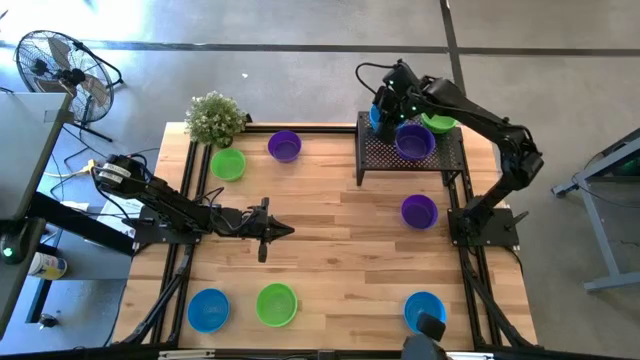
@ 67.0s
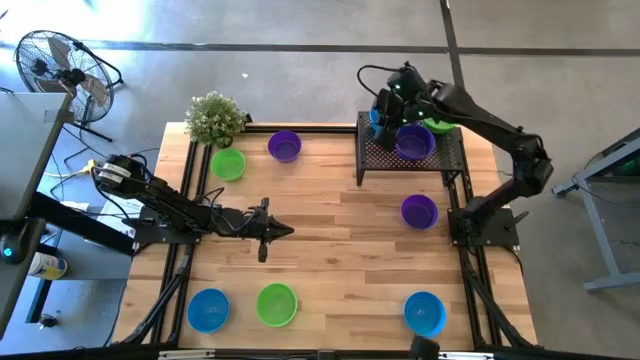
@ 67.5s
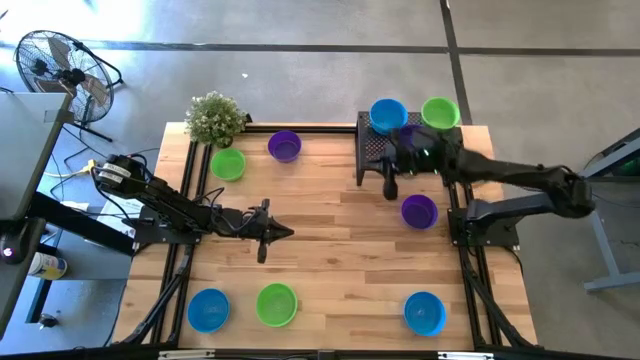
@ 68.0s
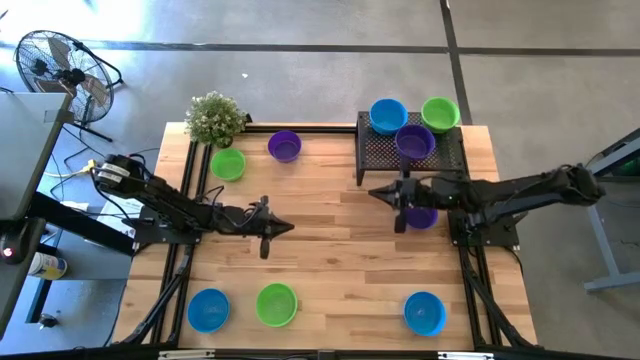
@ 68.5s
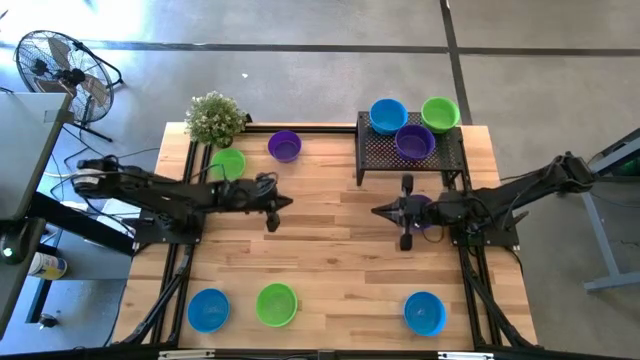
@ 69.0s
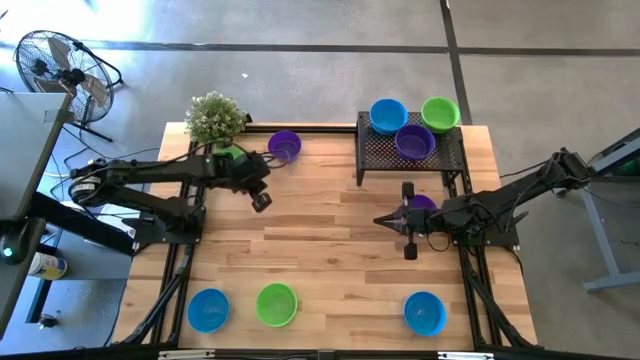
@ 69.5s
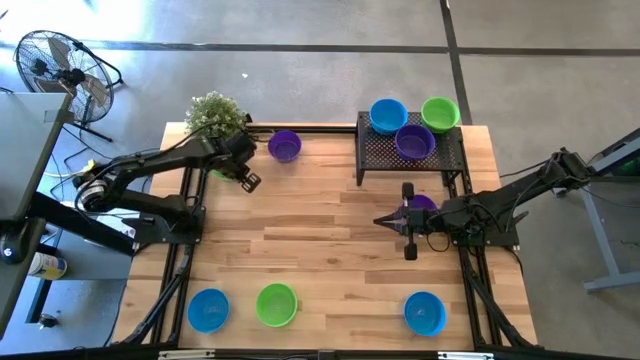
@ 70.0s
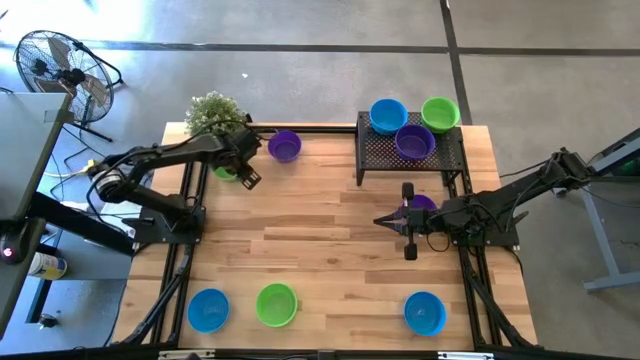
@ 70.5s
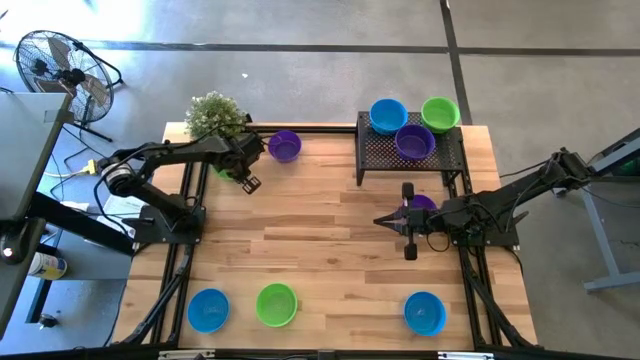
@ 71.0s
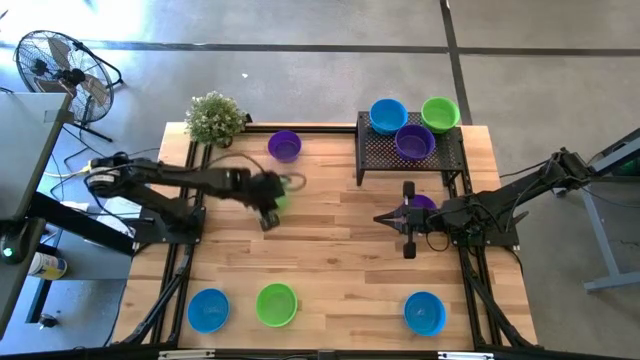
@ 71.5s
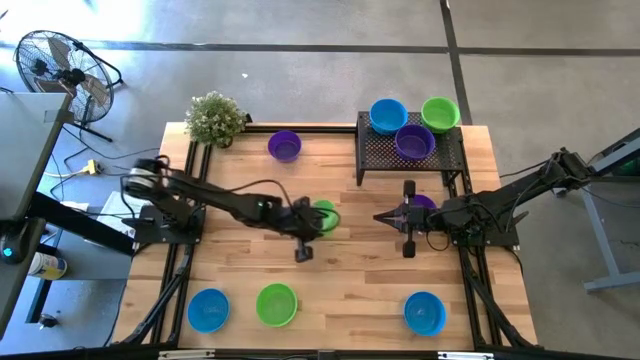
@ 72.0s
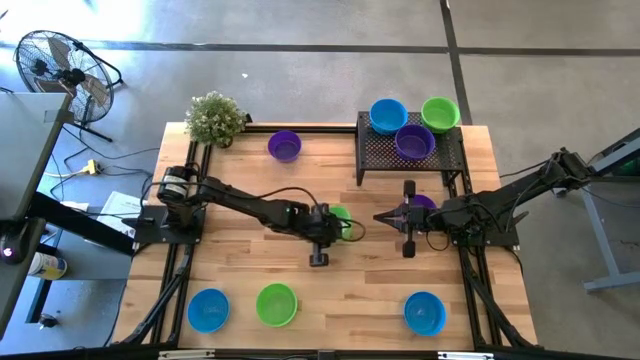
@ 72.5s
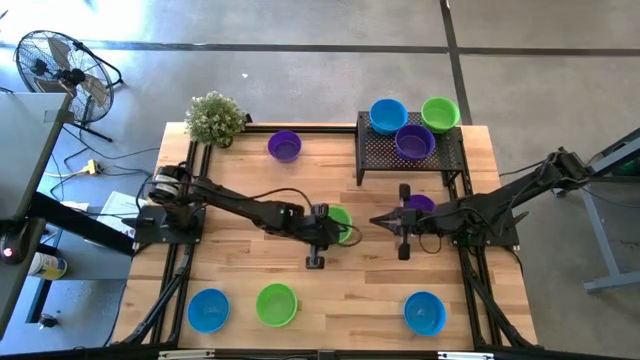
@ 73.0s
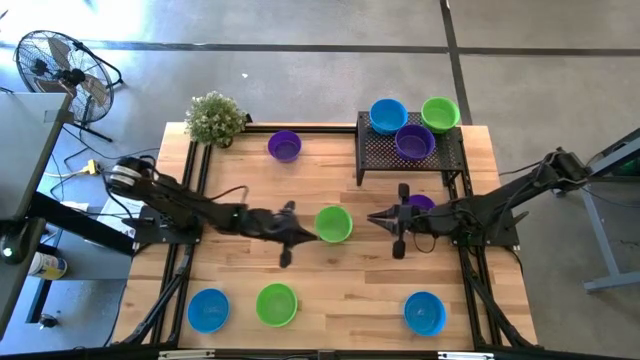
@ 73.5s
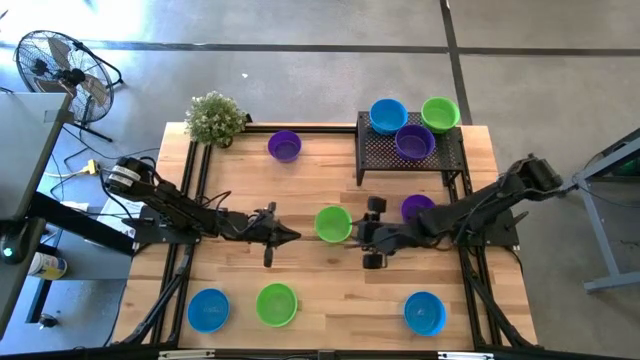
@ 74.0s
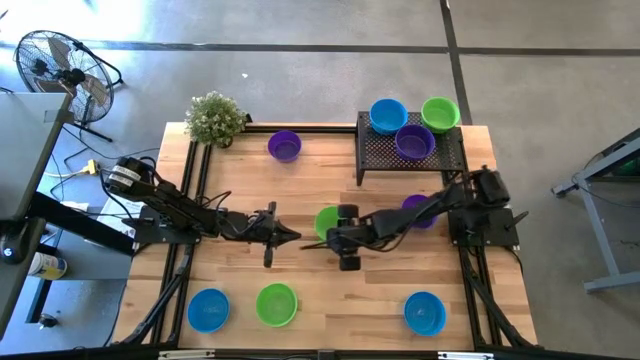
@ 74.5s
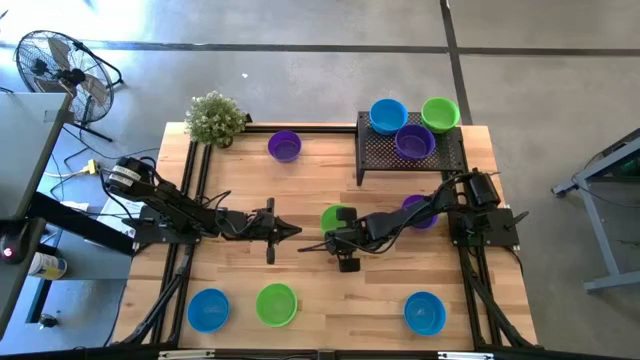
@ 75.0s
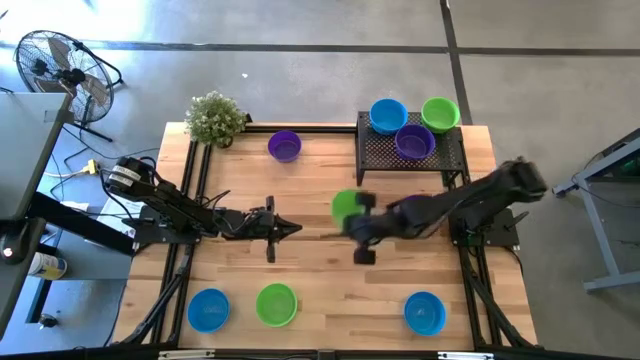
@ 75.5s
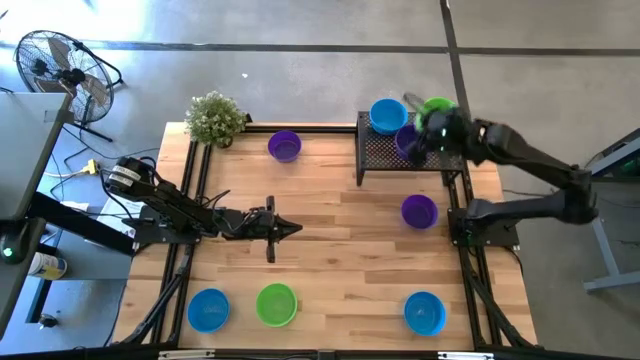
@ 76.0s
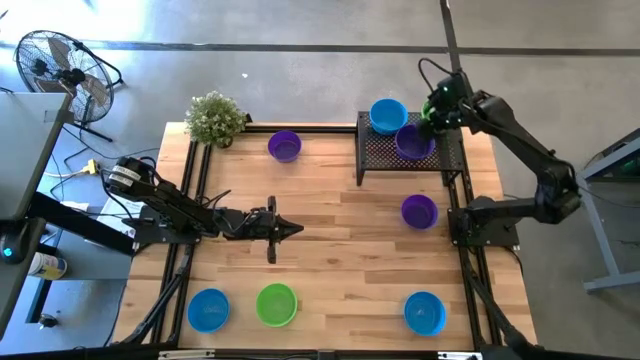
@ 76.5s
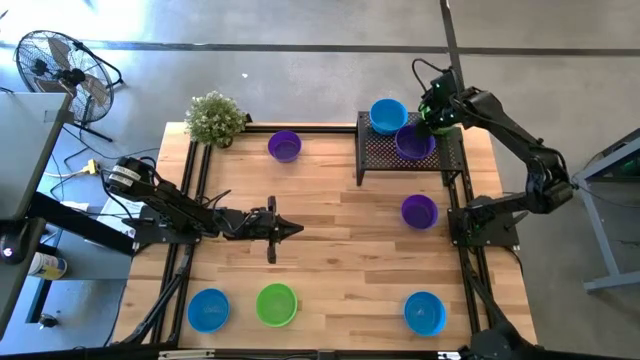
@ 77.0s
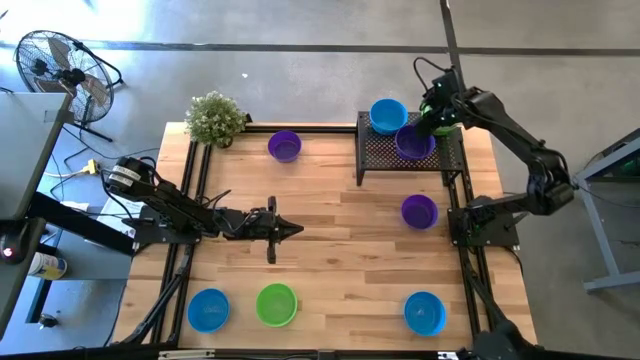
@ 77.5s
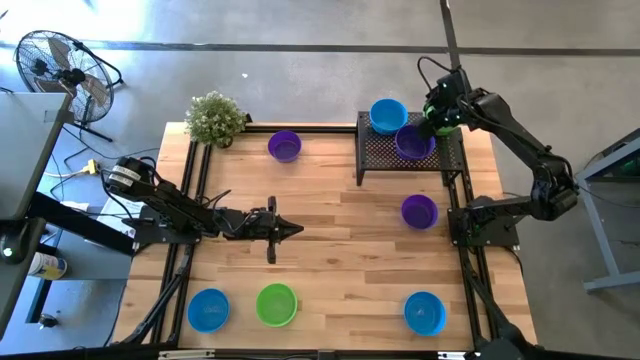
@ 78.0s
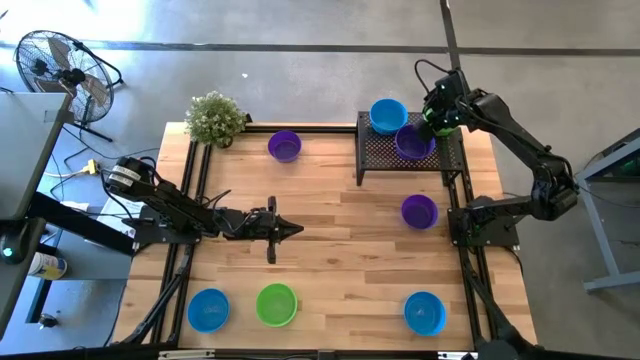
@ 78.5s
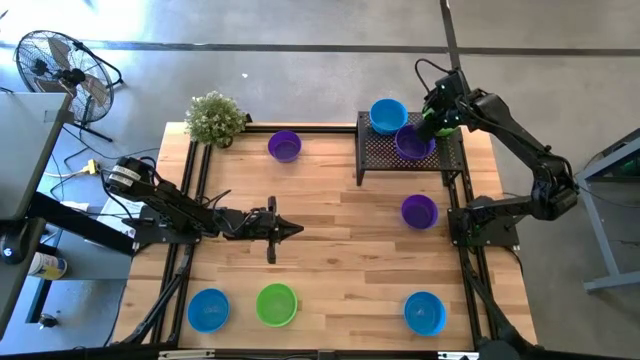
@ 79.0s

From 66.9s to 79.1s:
Task: Pick & Place Mini bowls
Stack the green bowl on top of the green bowls on the shelf

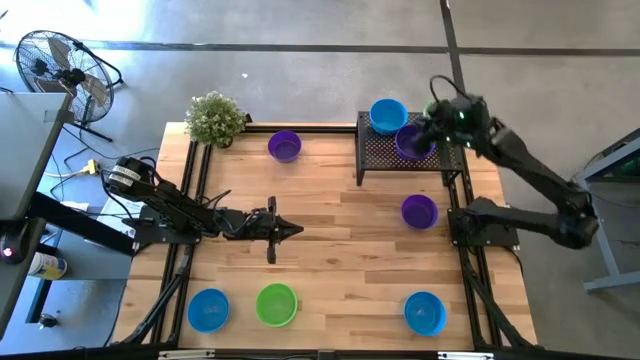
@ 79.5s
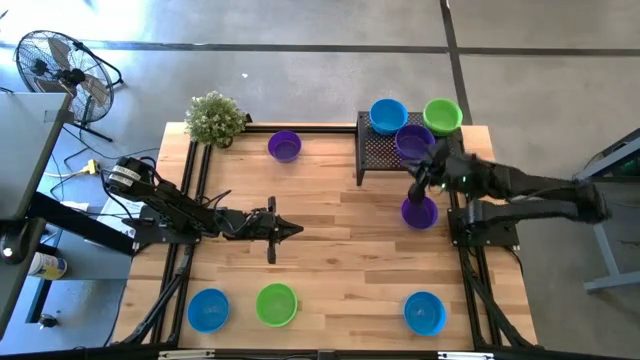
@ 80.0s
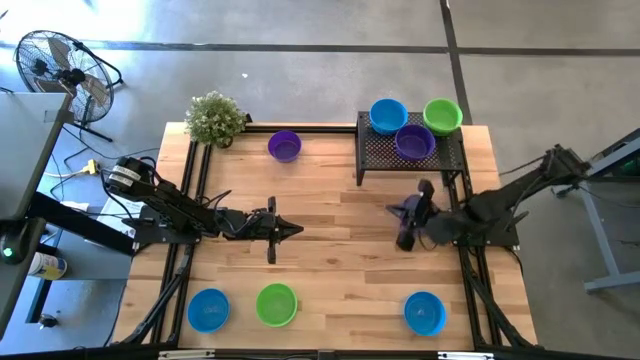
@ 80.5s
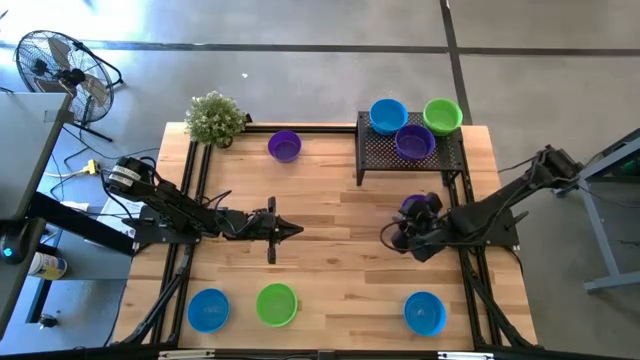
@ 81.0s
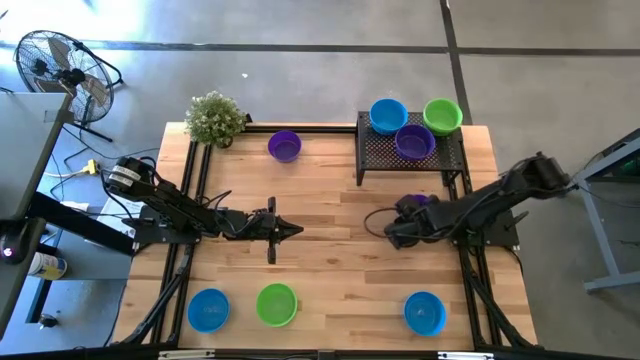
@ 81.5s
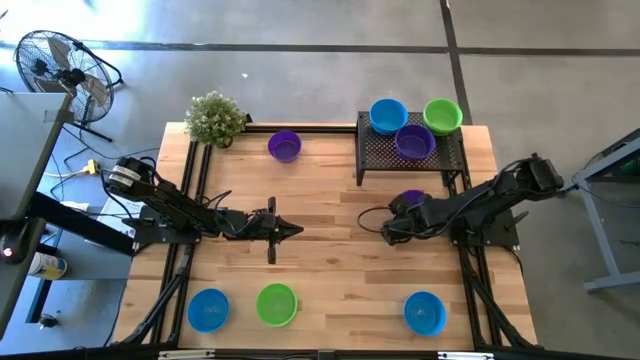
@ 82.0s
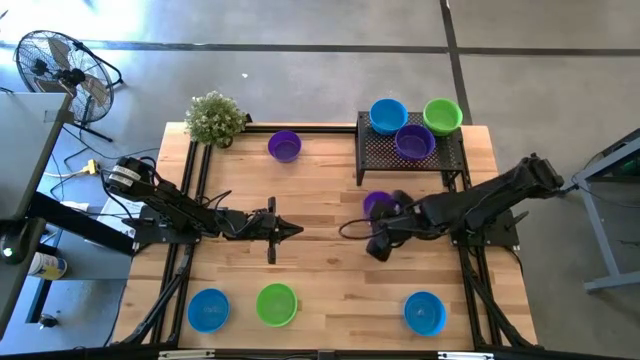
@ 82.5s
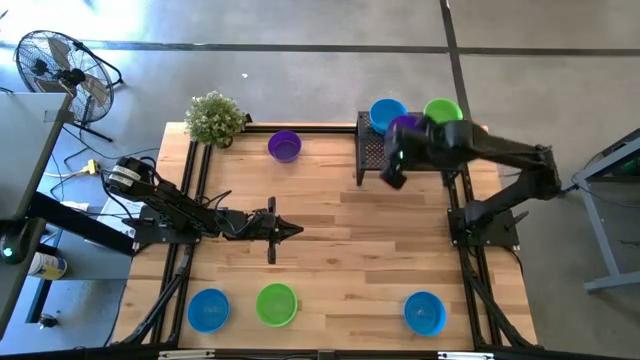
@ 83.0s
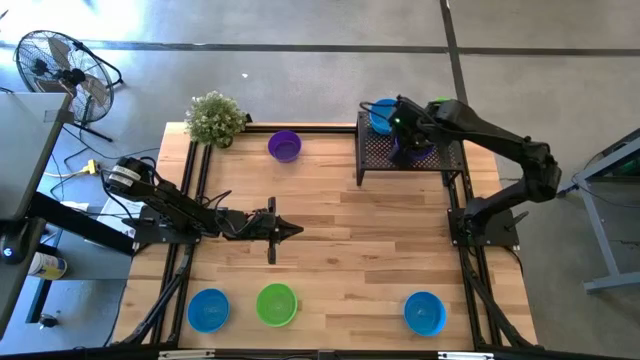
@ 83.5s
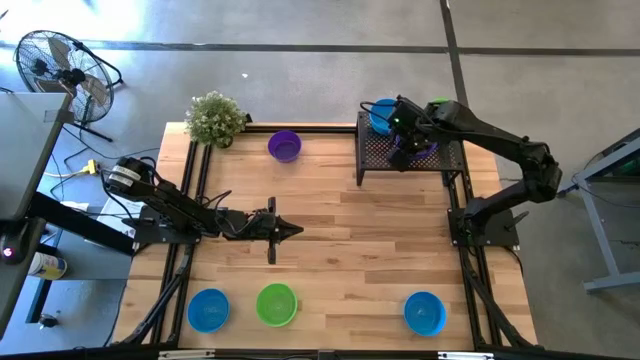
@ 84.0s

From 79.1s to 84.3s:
Stack the dark blue bowl on top of the dark blue bowls on the shelf

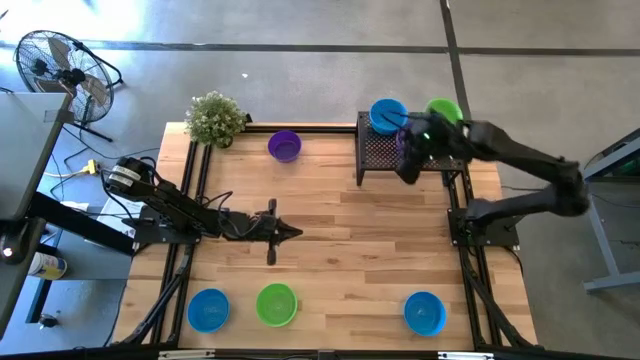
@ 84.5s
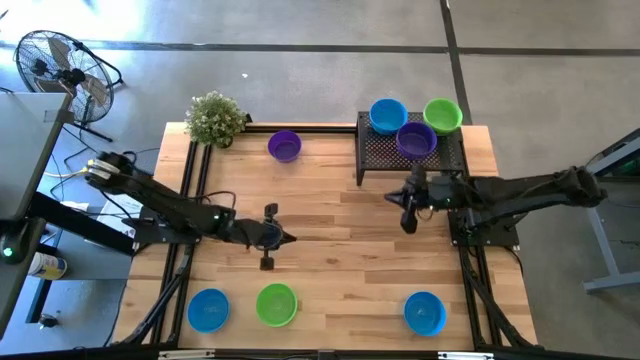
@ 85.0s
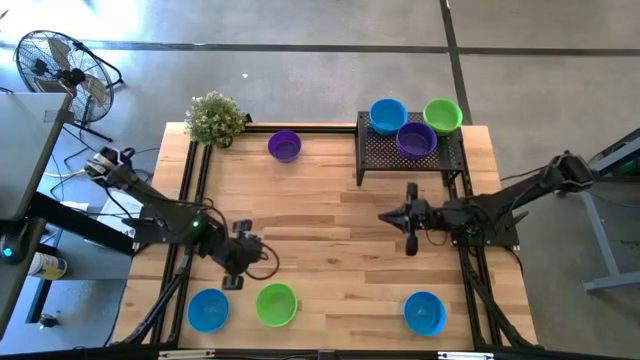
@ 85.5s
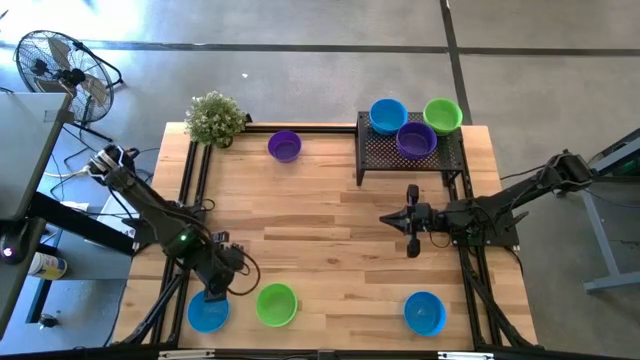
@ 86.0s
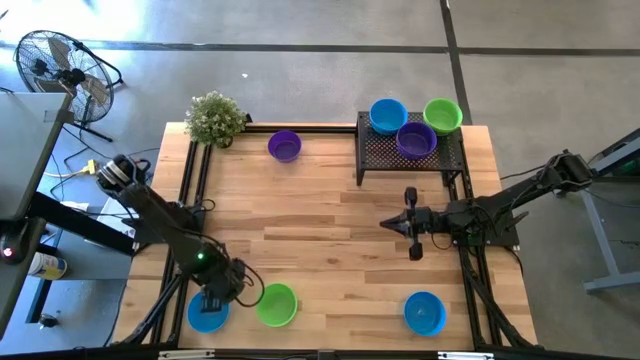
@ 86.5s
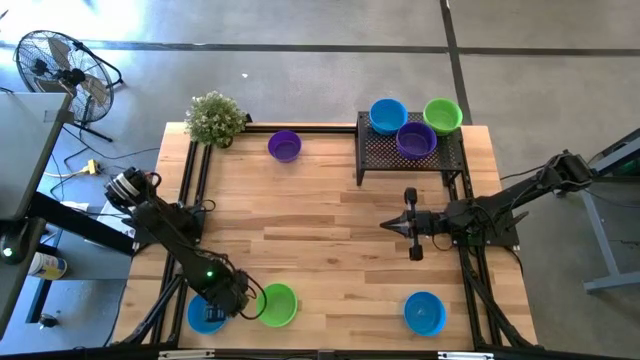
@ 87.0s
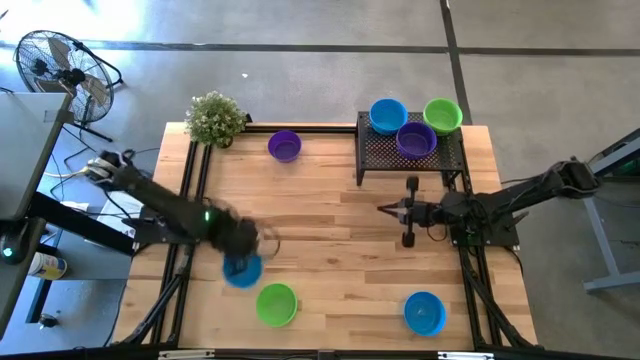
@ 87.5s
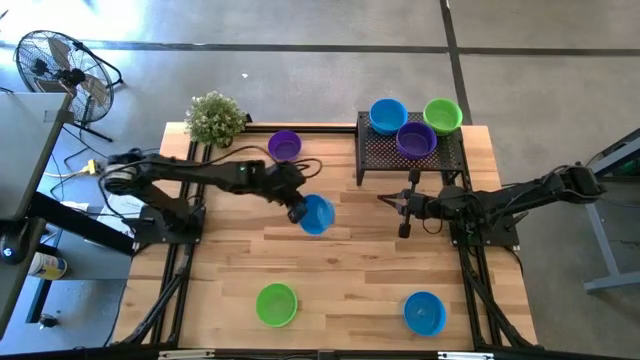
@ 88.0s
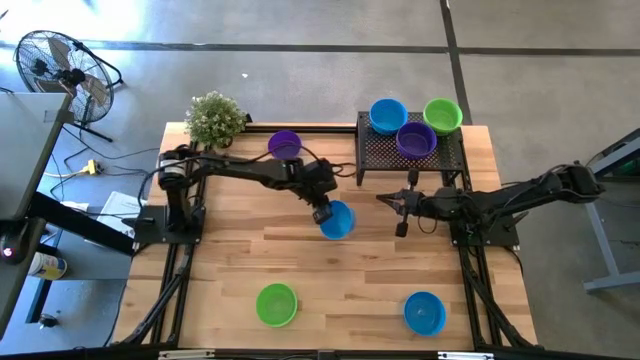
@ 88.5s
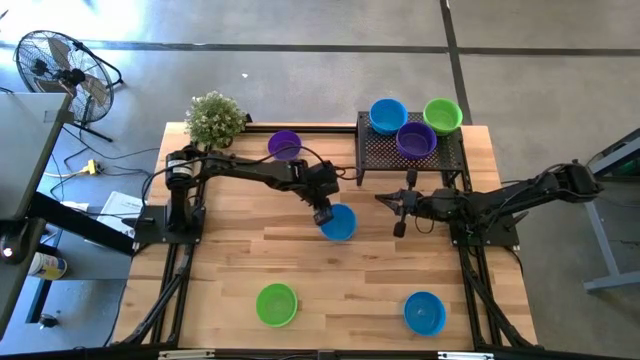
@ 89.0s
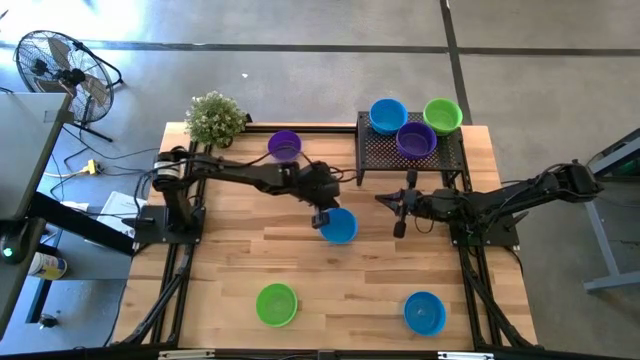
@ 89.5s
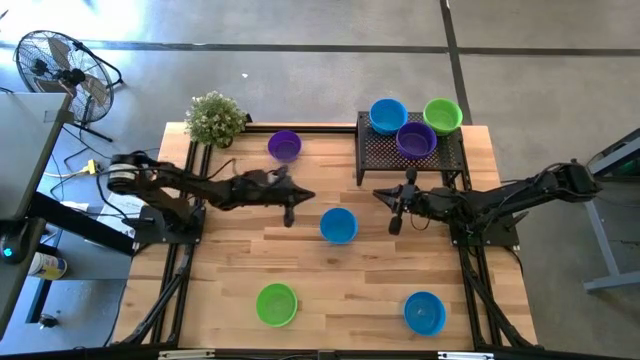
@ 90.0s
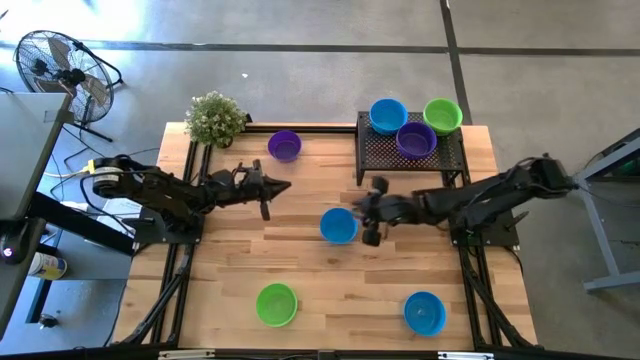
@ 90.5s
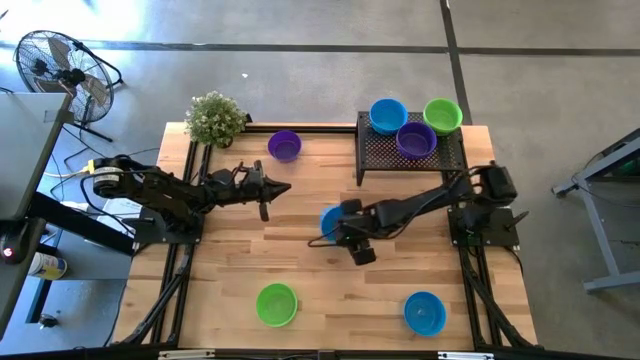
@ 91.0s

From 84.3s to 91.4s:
Stack the blue bowl on top of the blue bowls on the shelf
